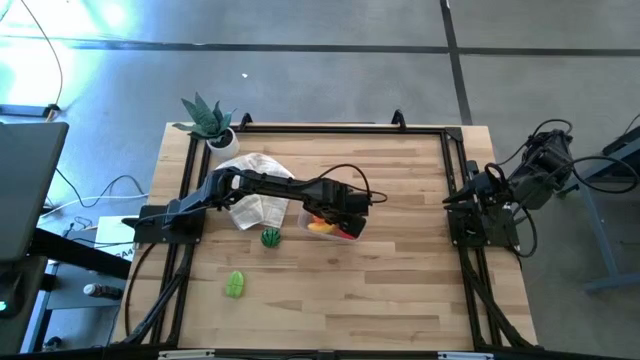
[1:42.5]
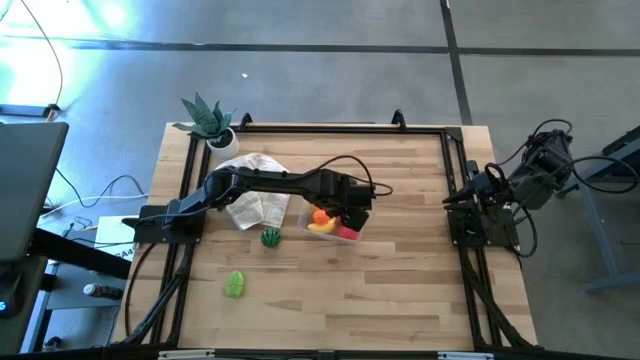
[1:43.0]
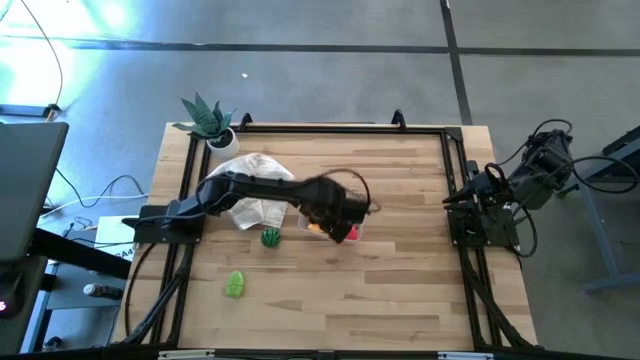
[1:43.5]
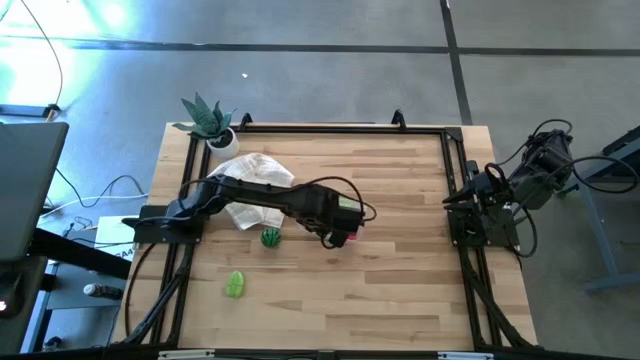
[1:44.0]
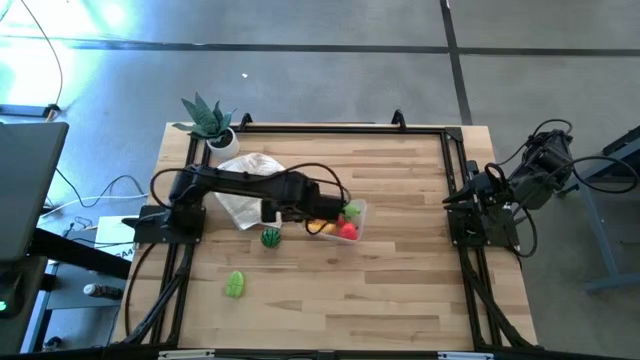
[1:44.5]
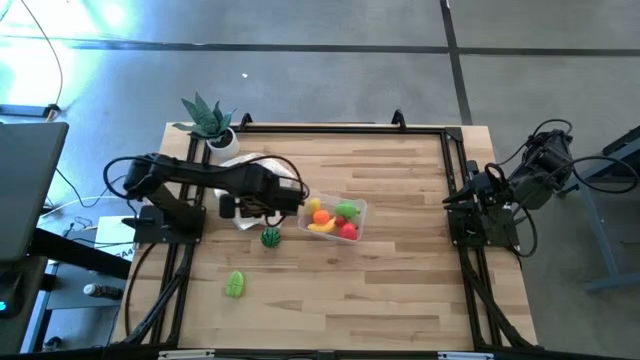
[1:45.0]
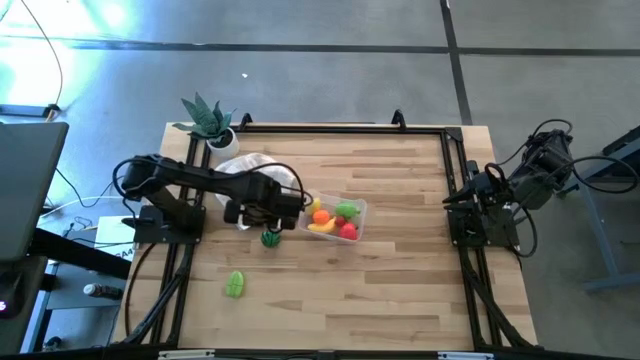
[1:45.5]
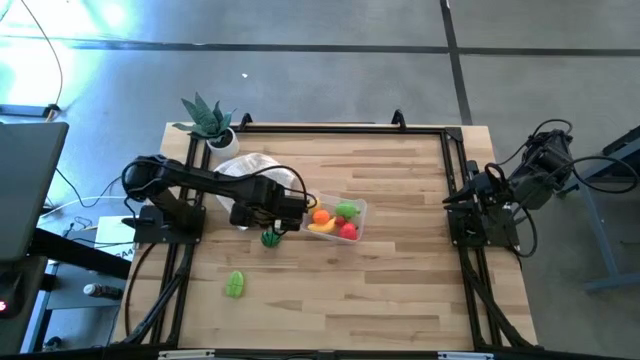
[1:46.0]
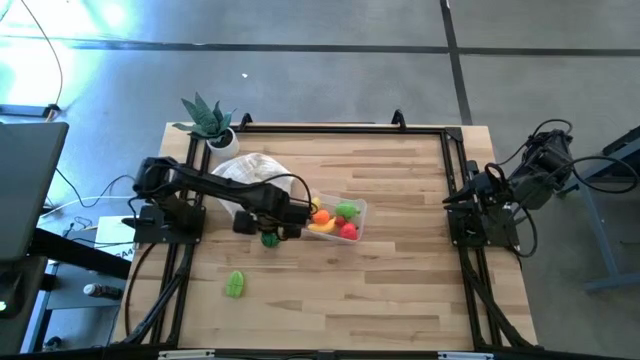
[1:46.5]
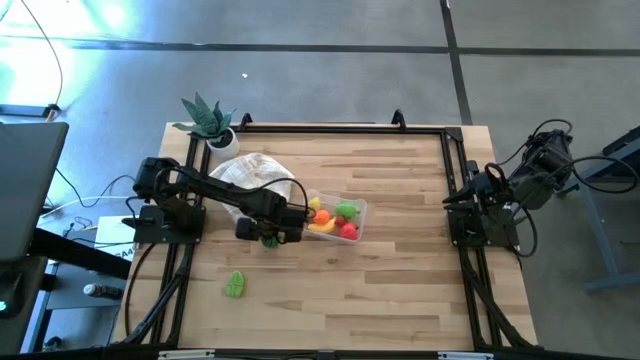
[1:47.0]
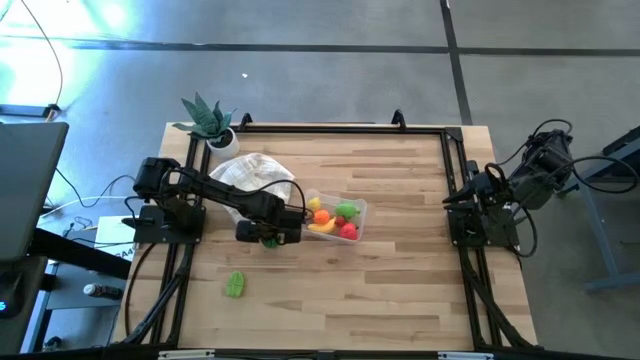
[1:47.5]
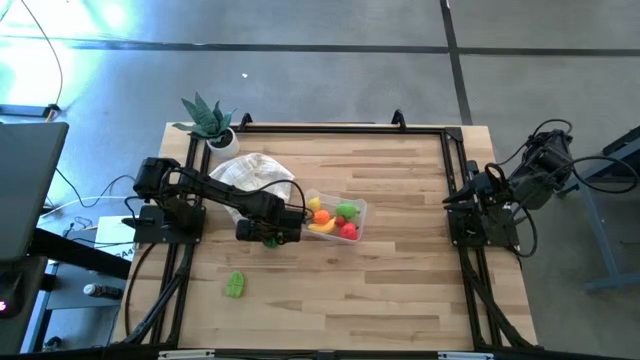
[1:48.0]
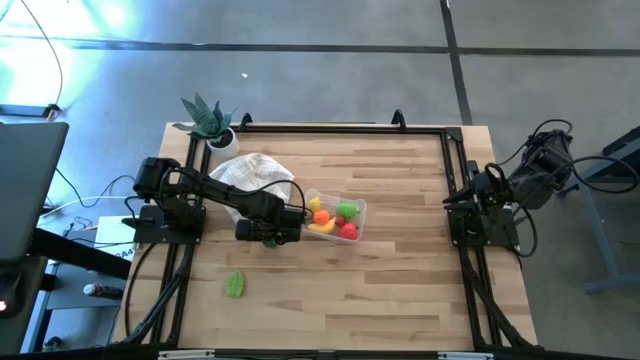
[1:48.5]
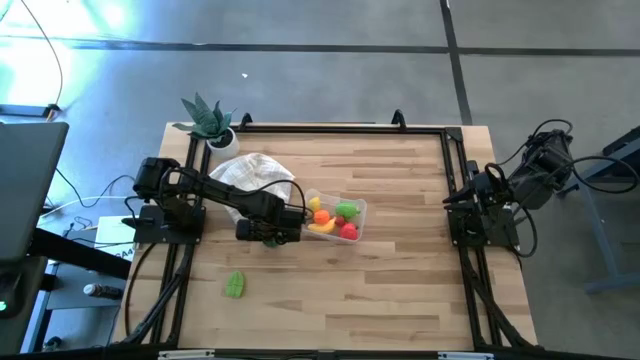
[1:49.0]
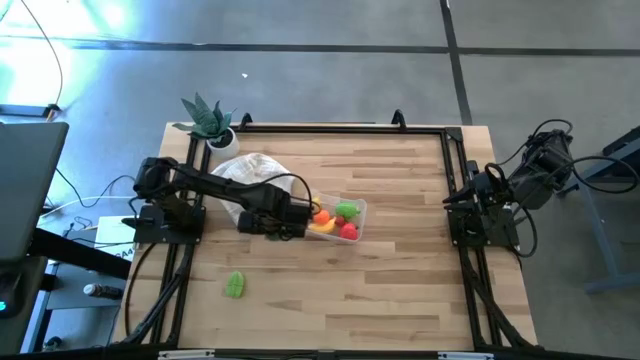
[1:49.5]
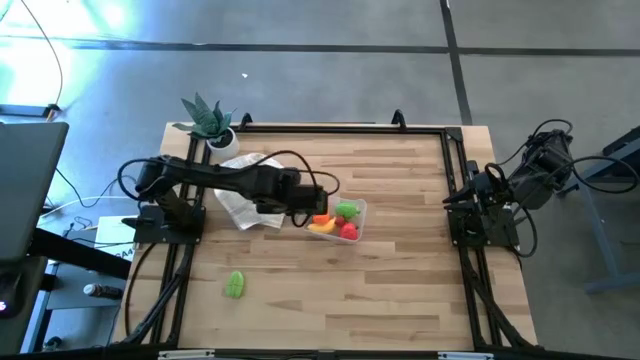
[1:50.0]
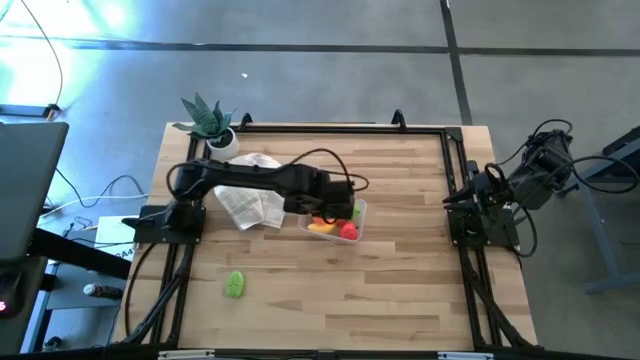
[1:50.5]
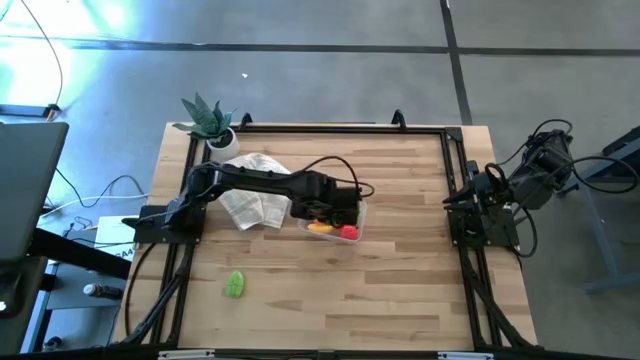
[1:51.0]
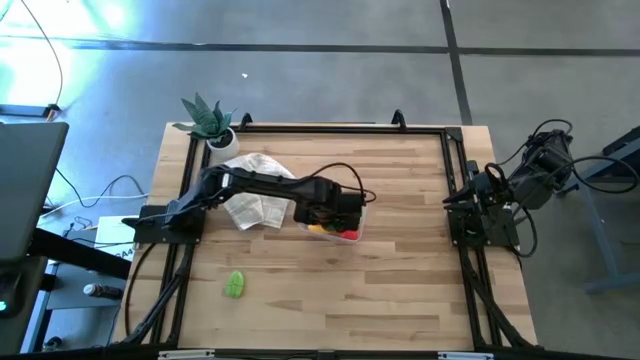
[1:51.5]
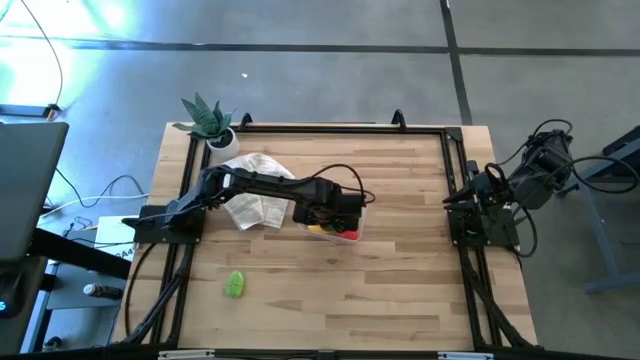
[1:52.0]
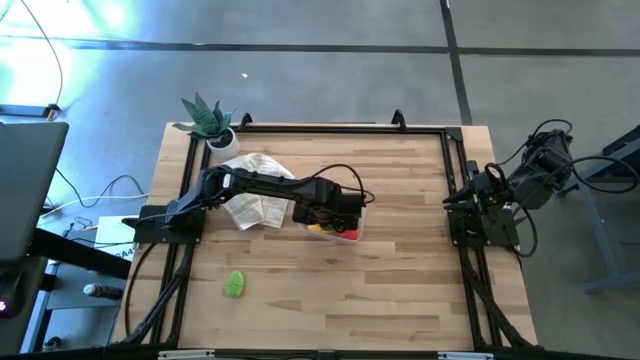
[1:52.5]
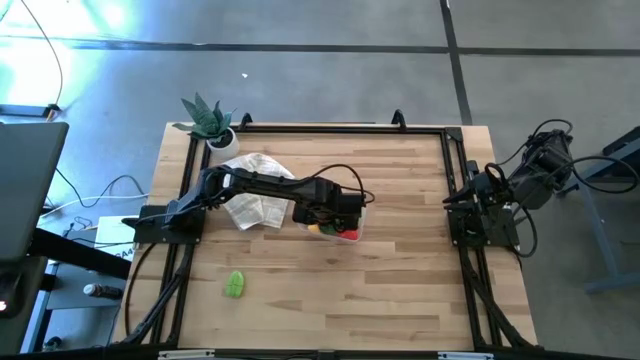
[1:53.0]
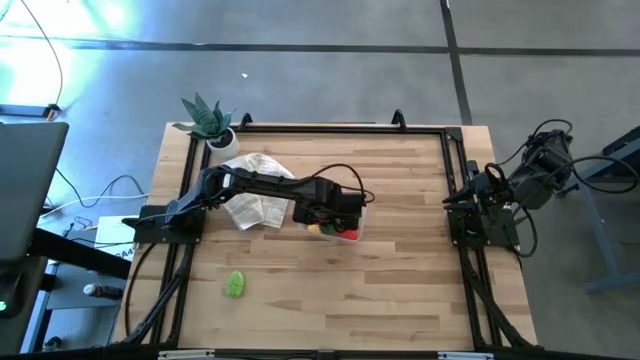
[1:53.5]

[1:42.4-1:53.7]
Task: Pick and placing Produce into tupperware
Put the green watermelon into the transparent container

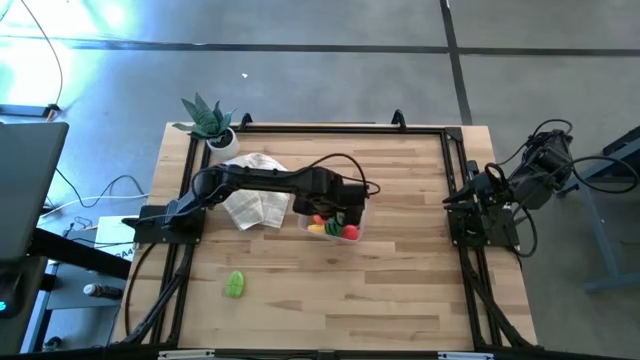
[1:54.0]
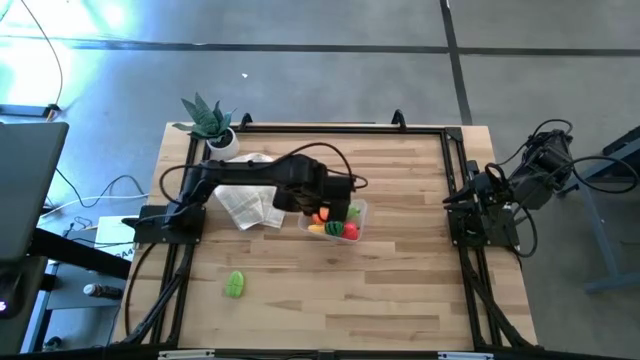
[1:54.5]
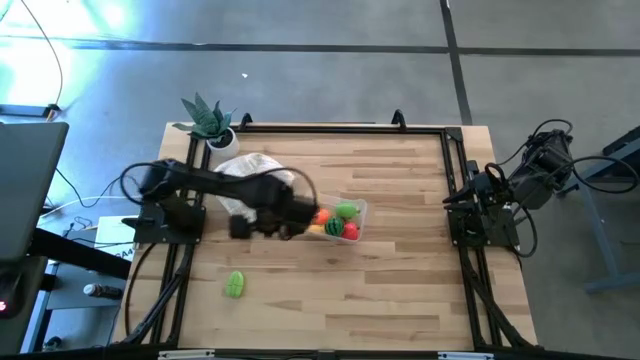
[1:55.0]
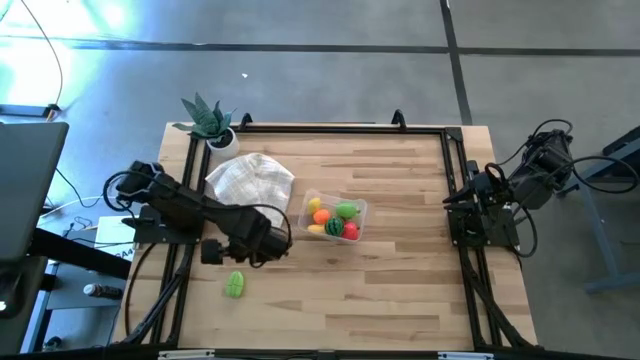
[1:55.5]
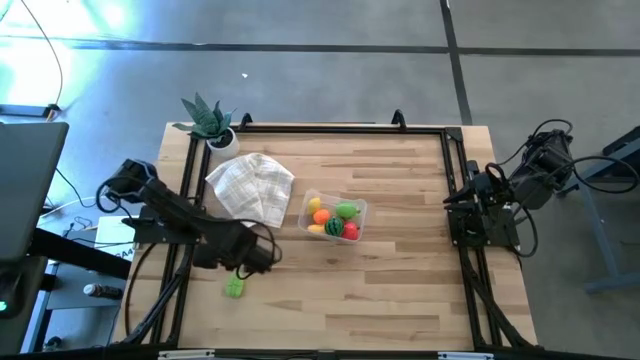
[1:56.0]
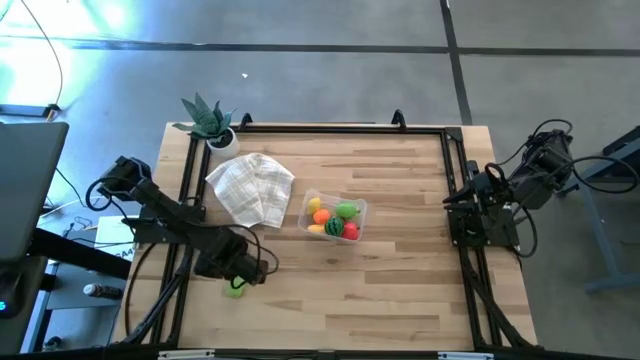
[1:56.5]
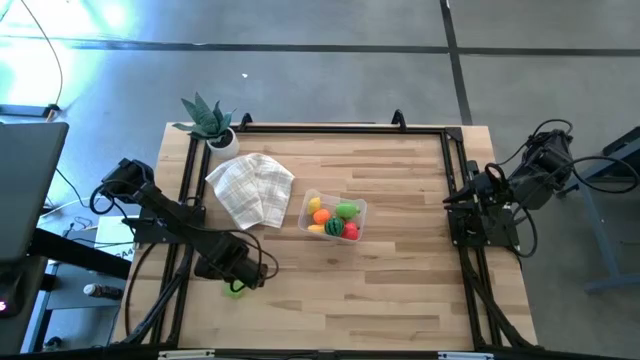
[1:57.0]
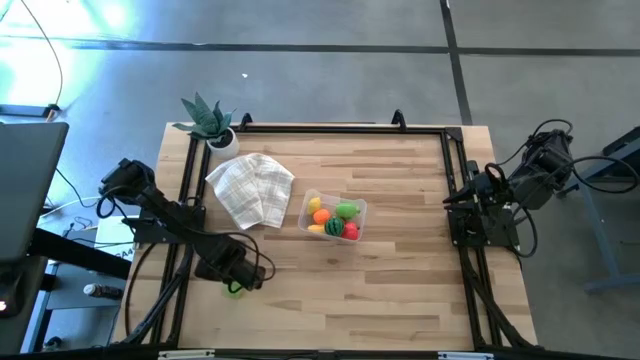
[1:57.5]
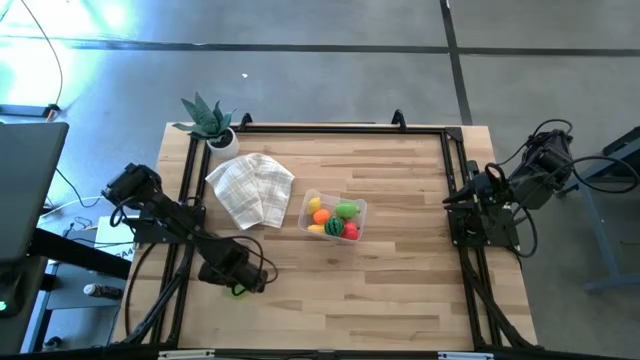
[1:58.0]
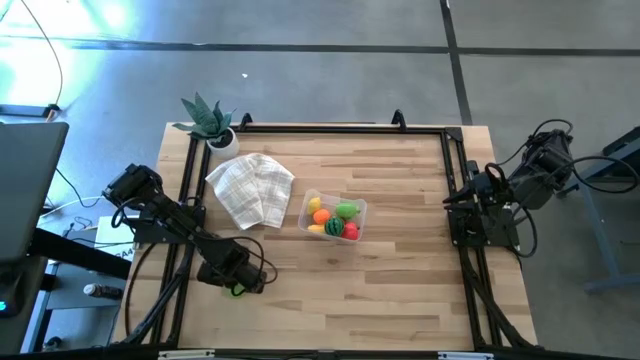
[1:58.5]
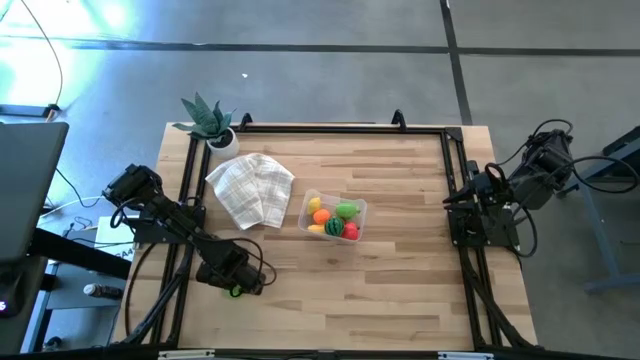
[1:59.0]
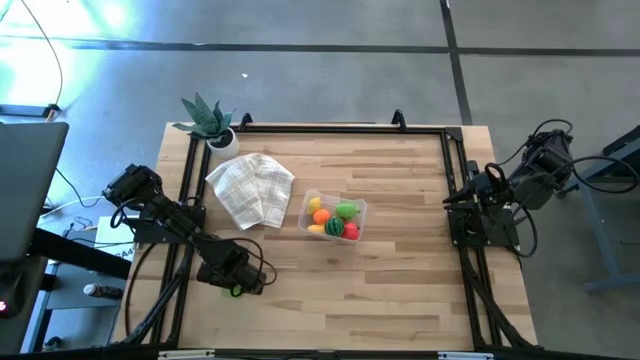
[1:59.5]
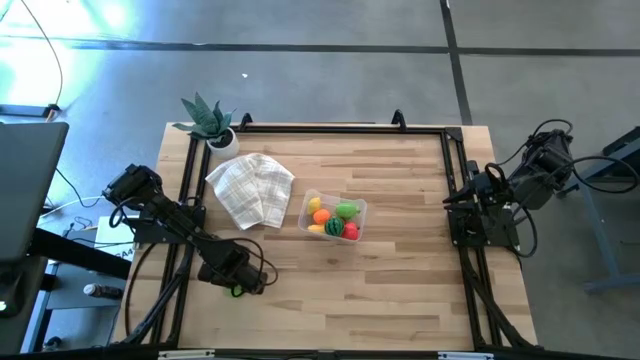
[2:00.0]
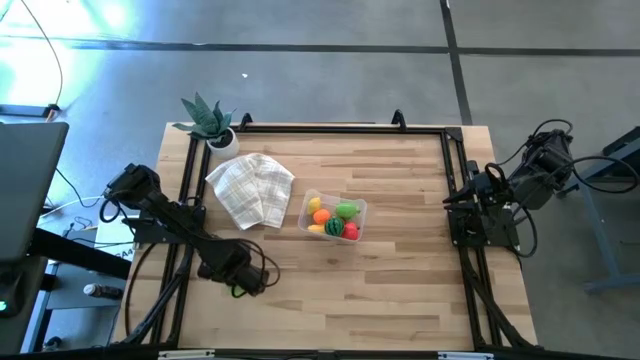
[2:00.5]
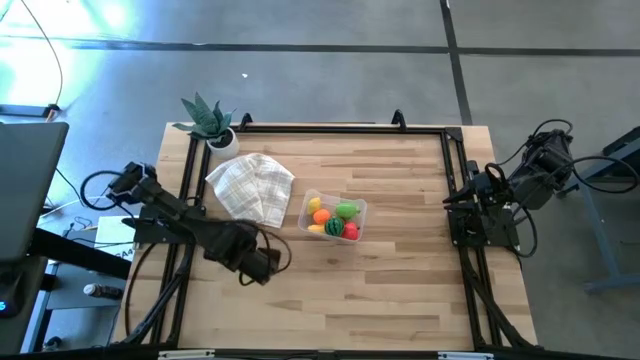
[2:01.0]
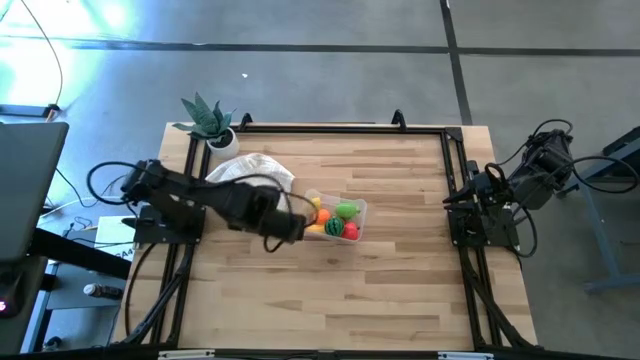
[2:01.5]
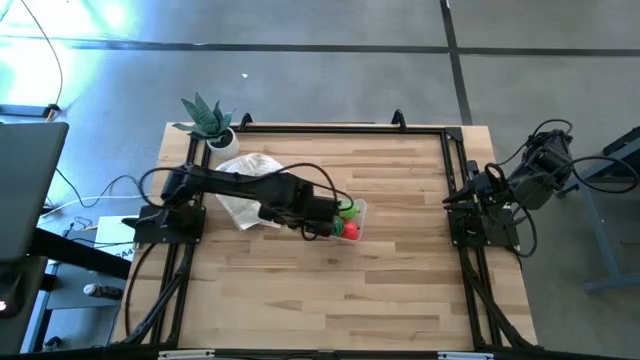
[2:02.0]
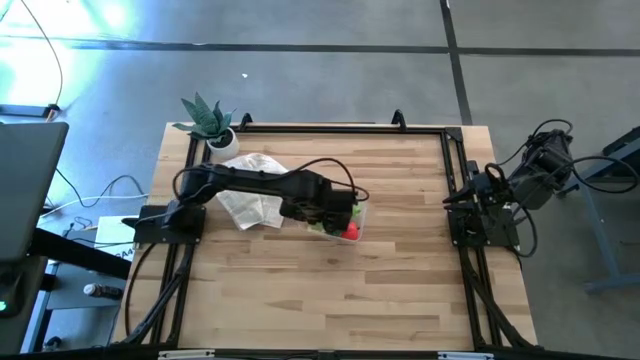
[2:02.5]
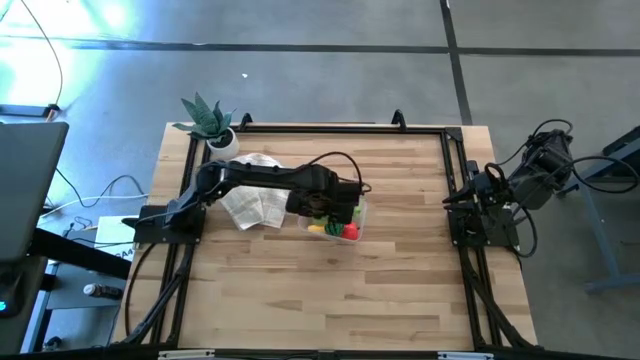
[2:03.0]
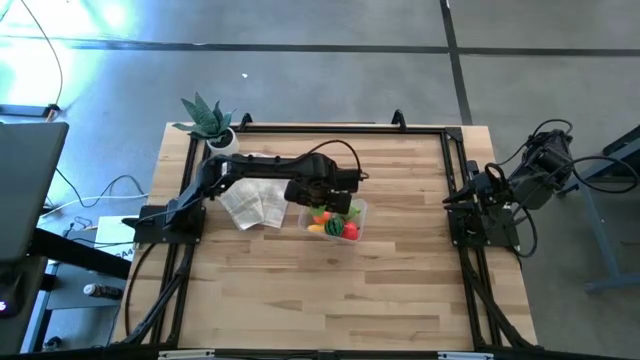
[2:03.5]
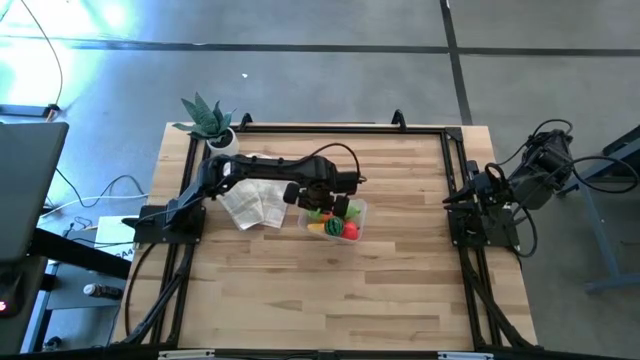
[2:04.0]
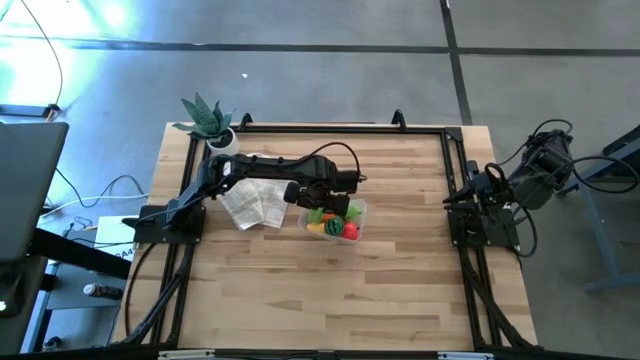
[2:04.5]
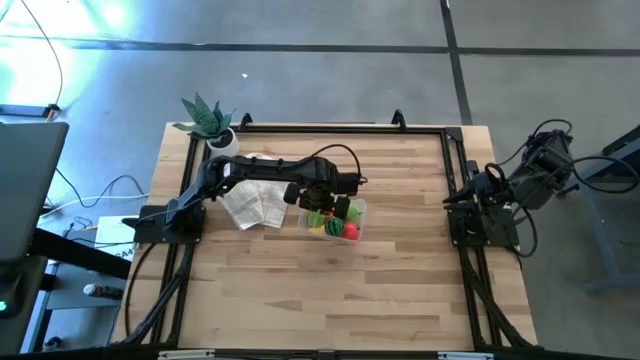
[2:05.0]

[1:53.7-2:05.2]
Put the green starfruit into the transparent container
